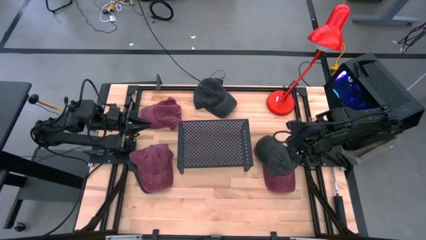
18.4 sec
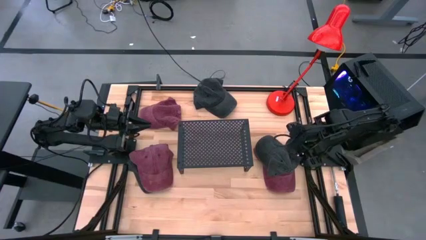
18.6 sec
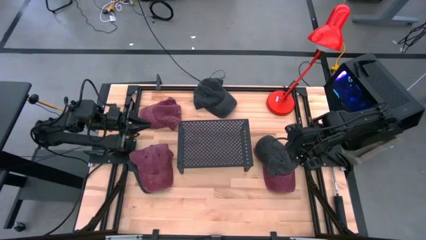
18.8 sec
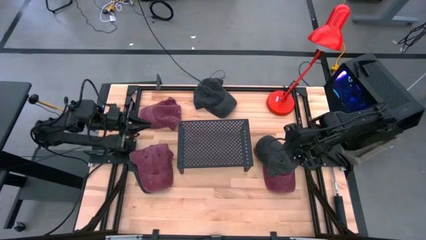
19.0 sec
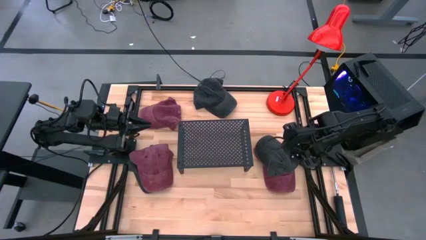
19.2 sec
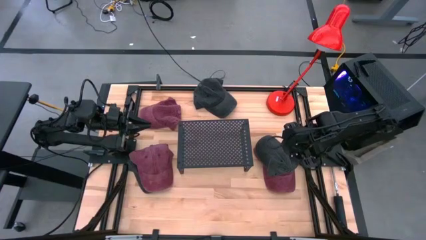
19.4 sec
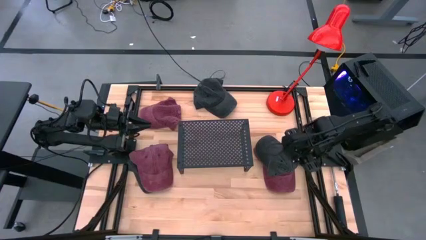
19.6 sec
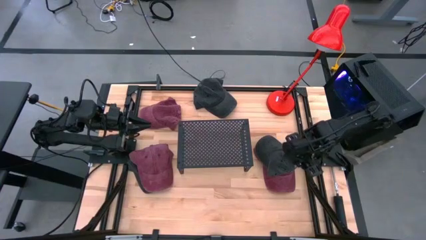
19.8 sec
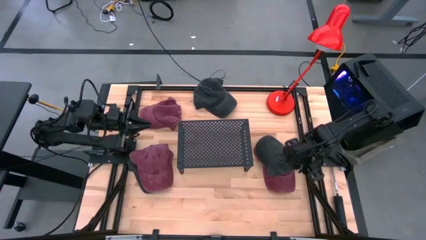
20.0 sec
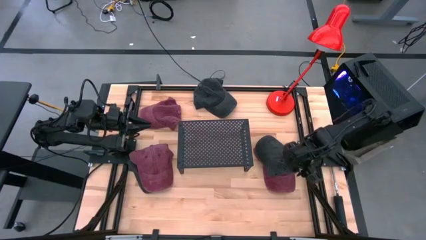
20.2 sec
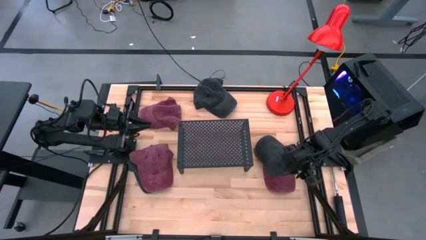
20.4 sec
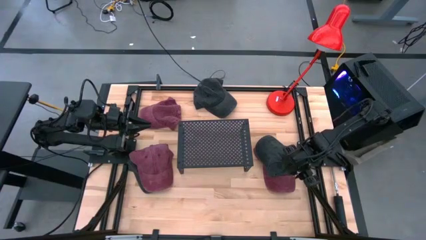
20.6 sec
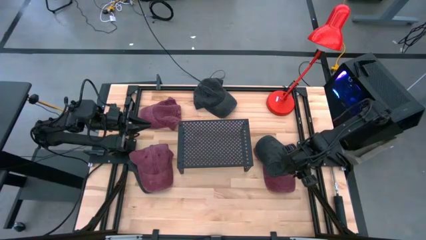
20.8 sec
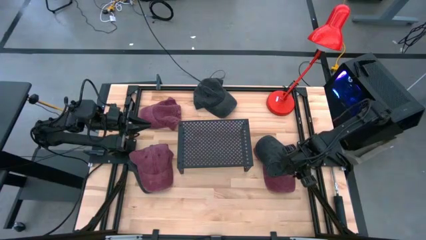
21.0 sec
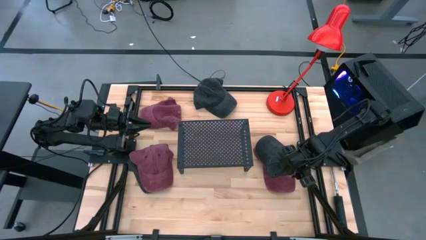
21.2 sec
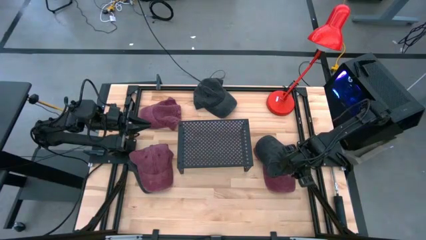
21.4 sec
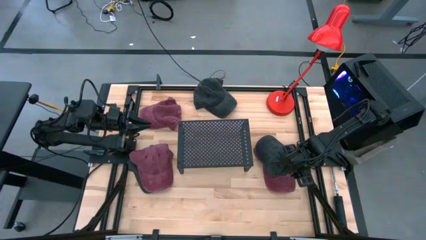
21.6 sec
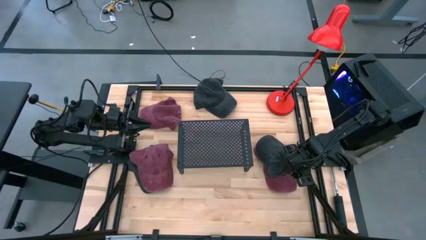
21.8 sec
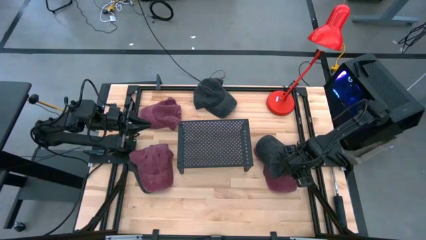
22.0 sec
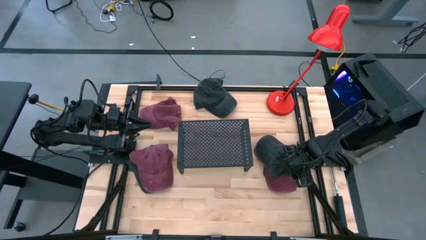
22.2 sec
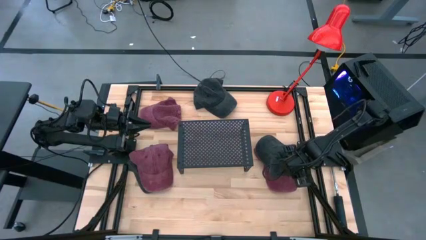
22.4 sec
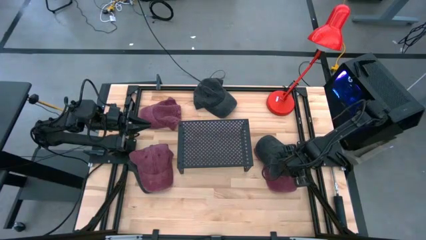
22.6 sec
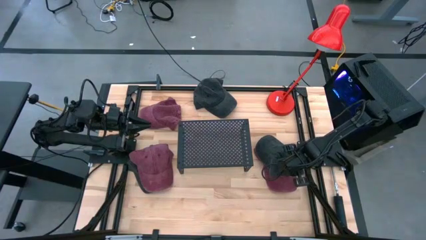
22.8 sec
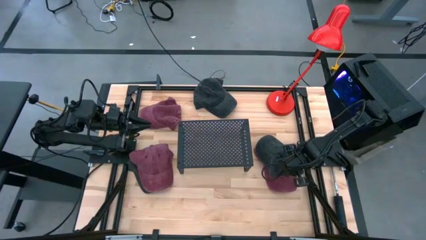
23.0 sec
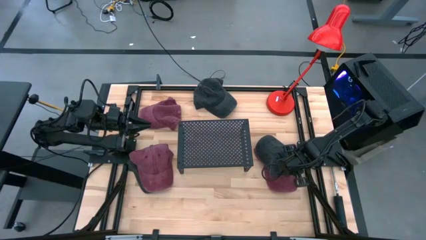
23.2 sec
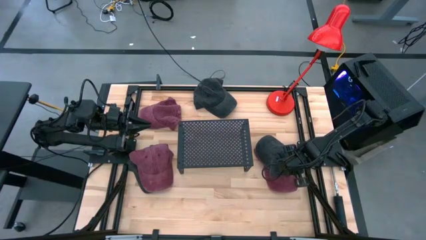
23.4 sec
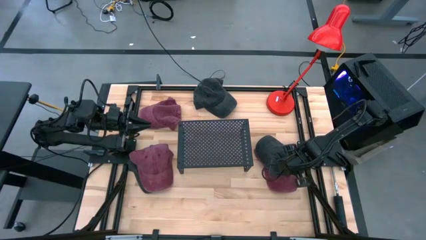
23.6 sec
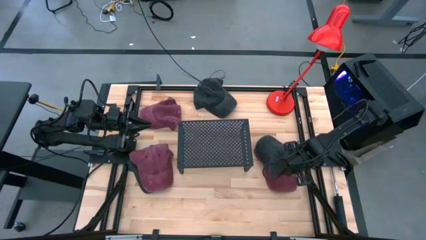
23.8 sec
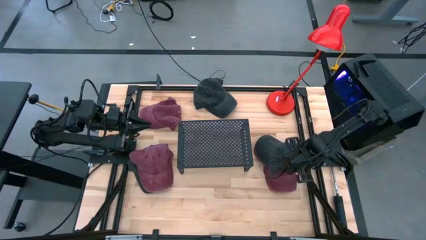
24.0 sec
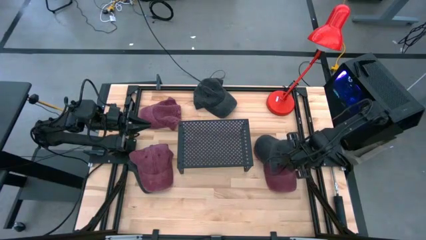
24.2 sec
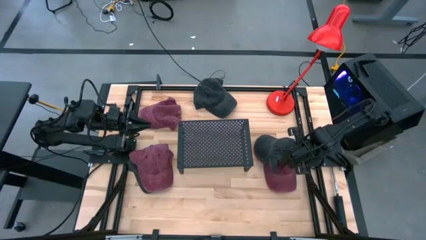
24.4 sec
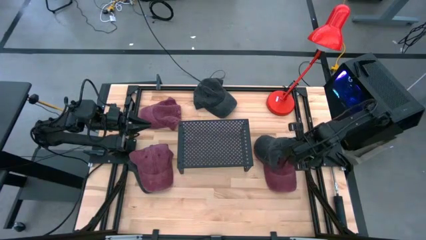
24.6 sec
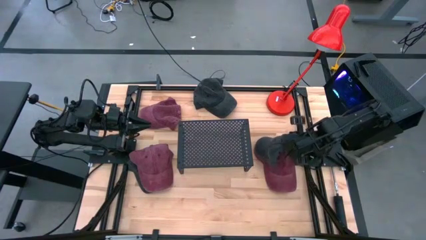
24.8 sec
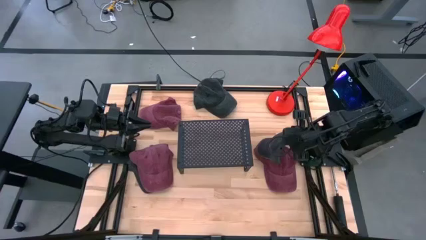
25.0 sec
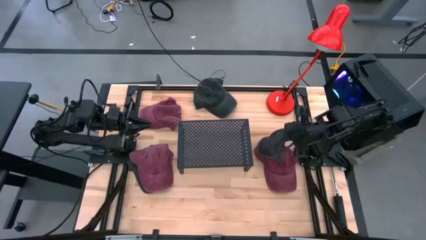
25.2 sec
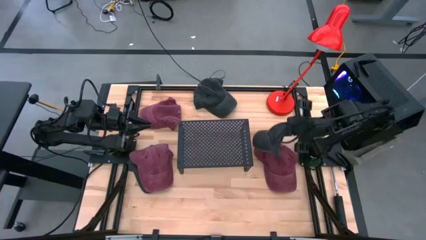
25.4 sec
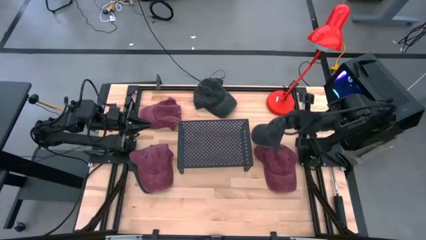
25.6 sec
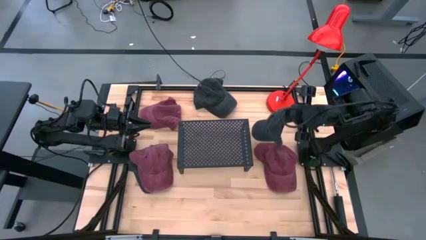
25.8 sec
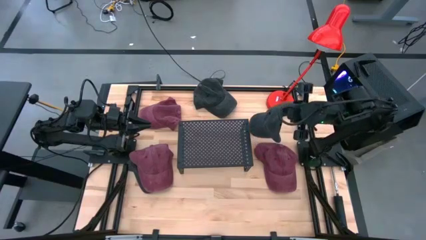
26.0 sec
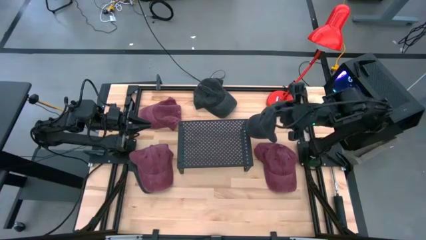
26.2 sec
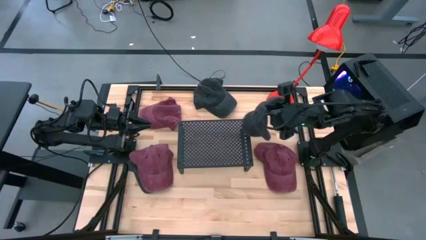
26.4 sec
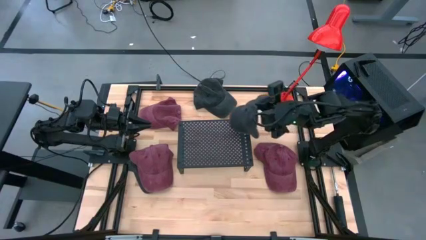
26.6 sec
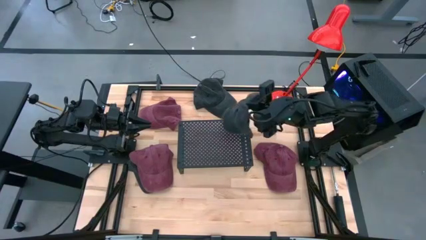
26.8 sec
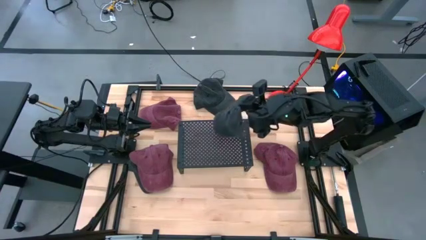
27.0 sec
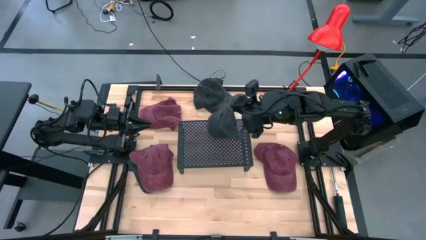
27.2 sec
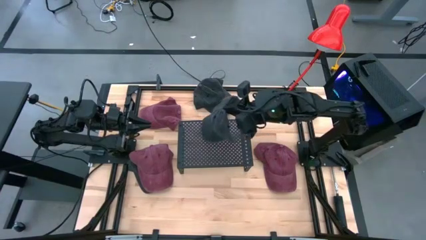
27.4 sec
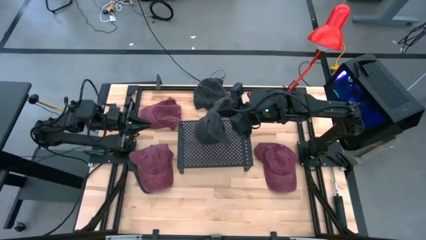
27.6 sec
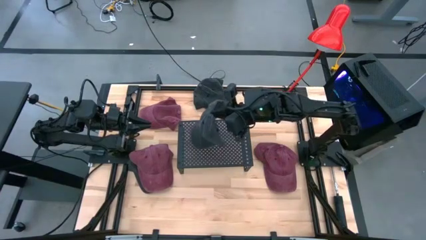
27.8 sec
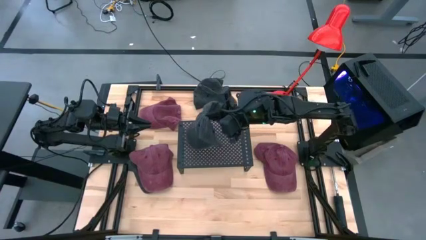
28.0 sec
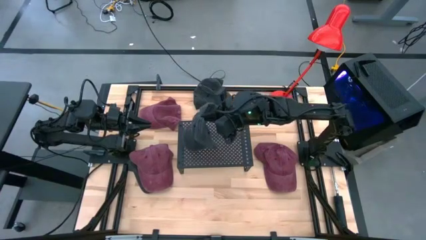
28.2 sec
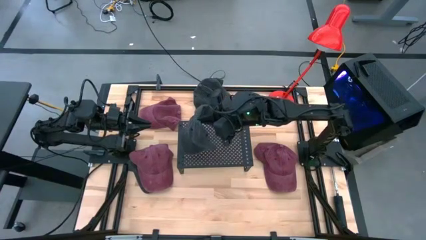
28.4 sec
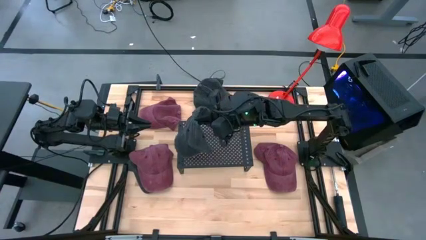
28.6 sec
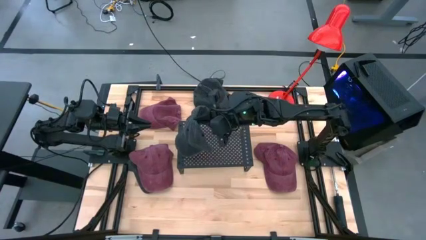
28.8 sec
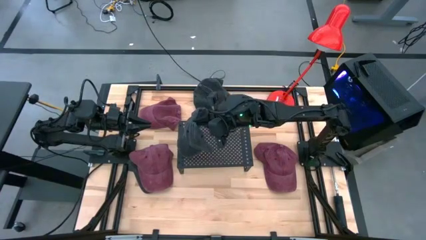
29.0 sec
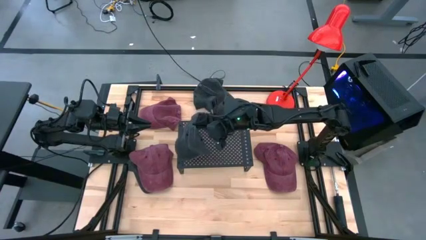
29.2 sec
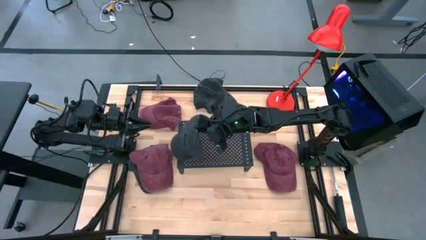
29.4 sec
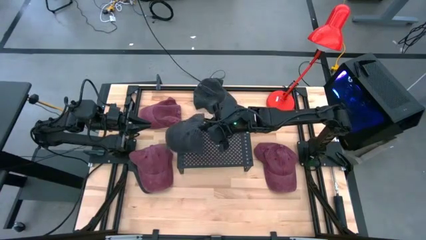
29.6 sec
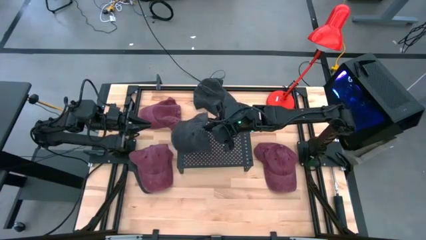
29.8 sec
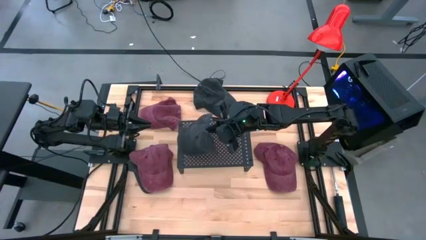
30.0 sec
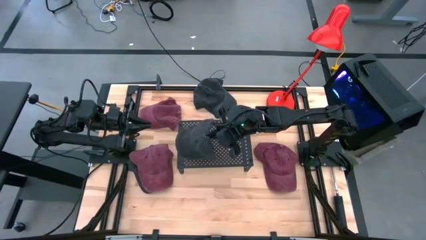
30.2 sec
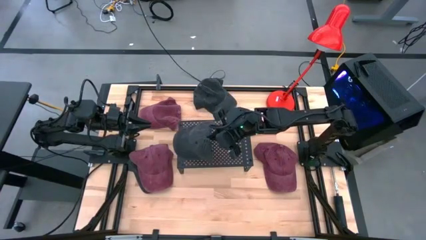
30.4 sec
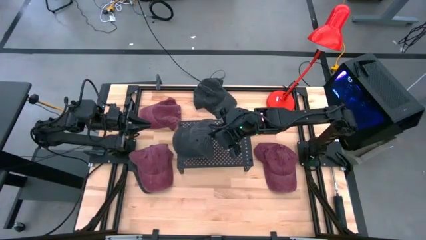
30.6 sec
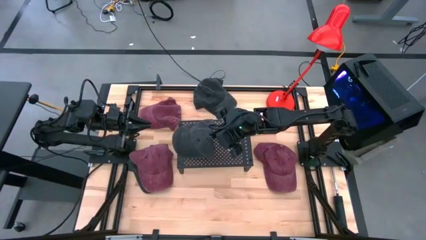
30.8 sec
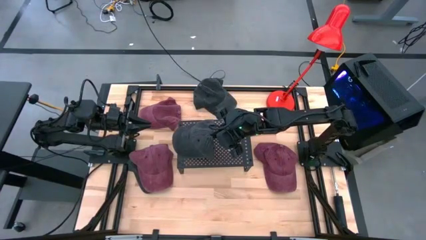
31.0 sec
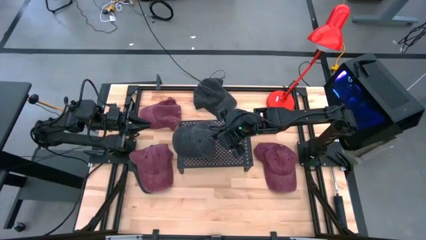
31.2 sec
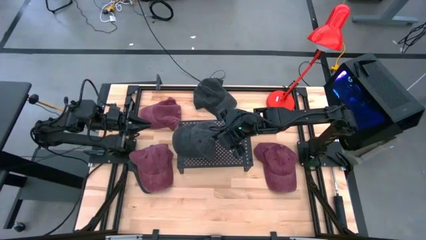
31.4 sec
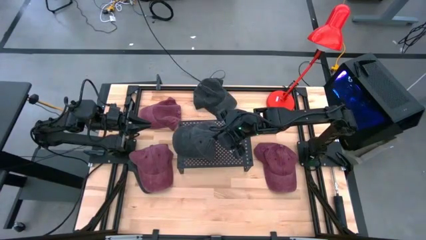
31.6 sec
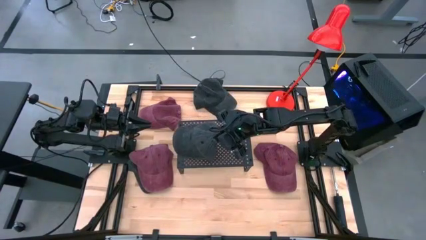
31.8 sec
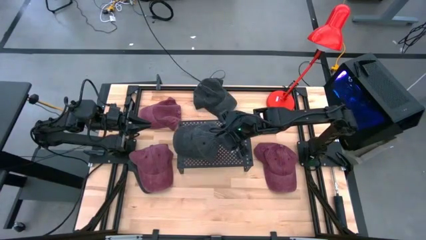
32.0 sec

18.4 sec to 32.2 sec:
Task: Pick & Place hat
Put the bottom right black cap on the shelf

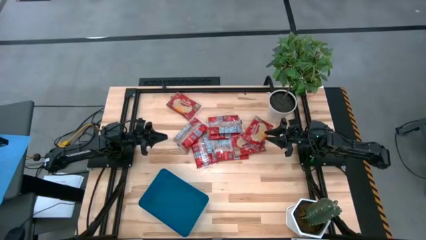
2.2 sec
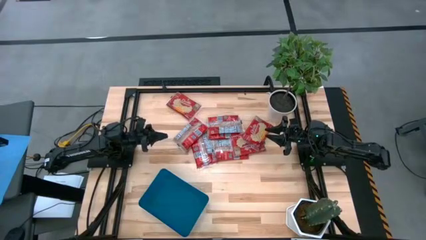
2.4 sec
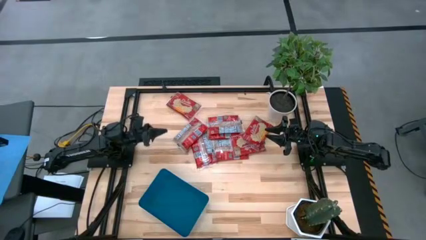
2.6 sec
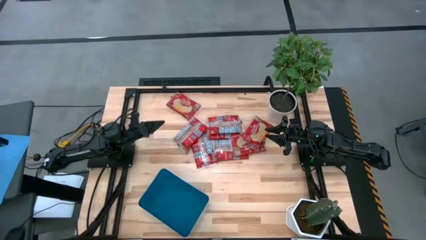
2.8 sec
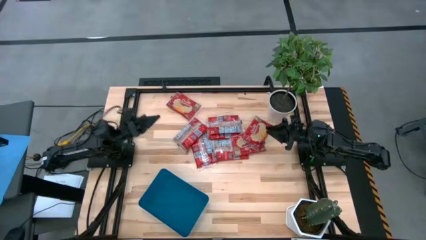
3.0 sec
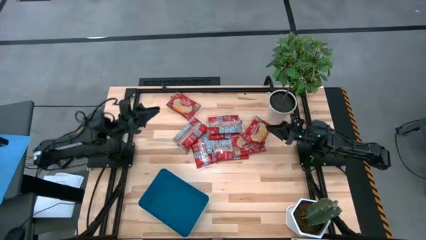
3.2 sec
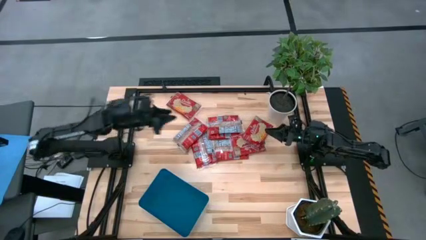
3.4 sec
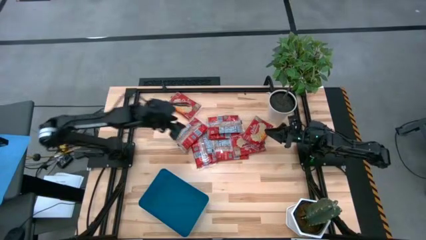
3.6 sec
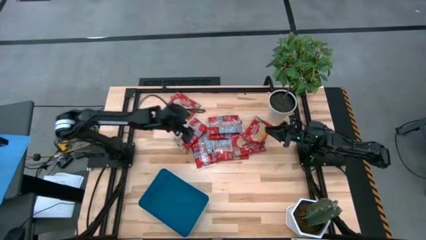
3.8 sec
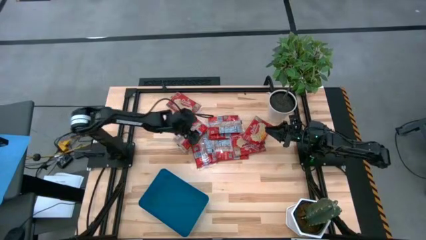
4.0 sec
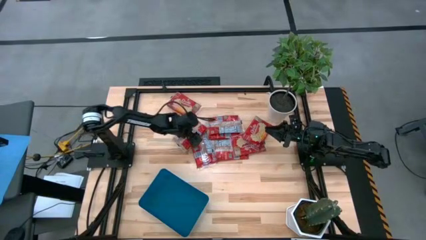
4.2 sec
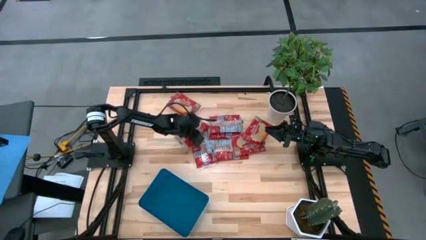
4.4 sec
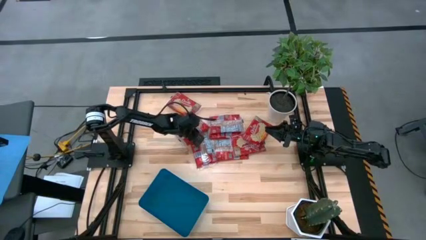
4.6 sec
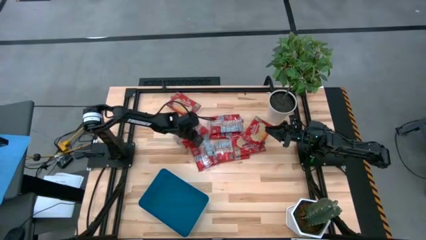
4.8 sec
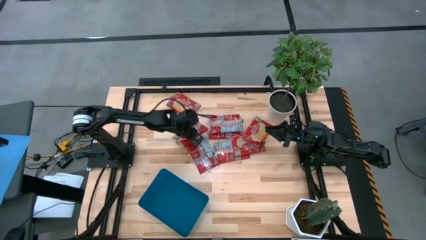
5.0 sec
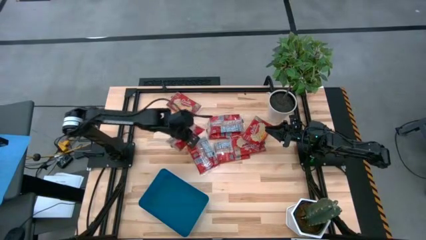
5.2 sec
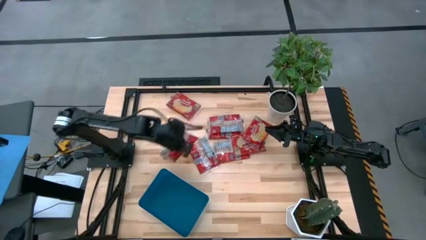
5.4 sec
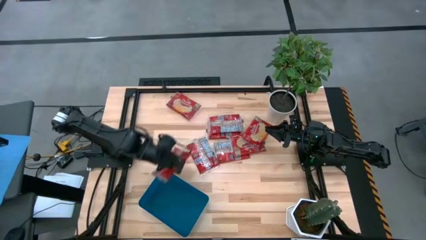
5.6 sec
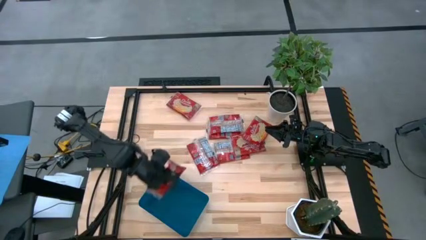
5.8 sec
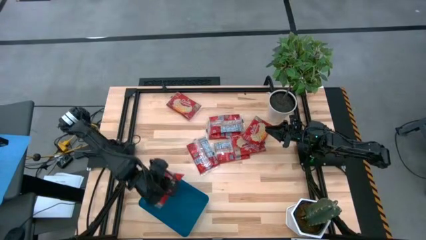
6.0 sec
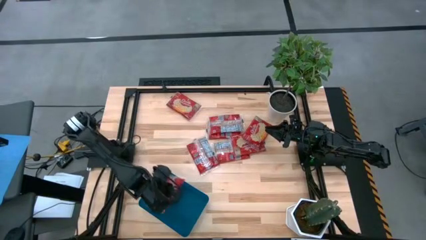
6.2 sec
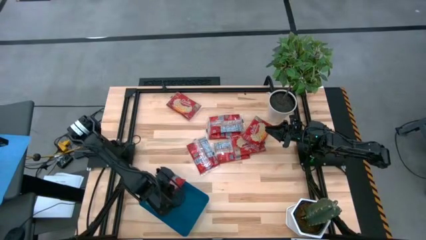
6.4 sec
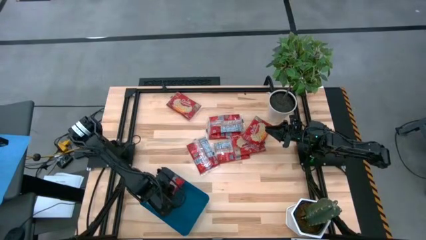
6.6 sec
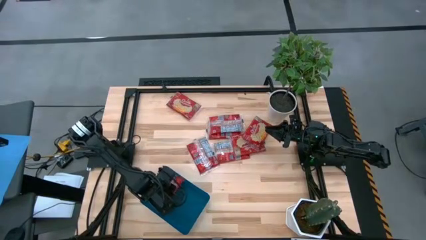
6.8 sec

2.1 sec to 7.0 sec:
Task: Sort popcorn bags into baskets
Put the red popcorn bag into the blue bin
